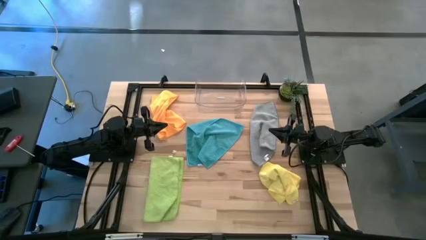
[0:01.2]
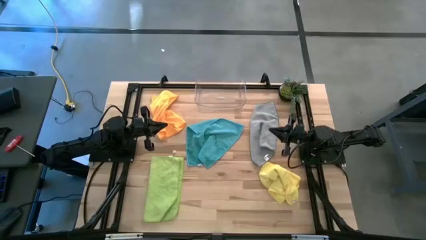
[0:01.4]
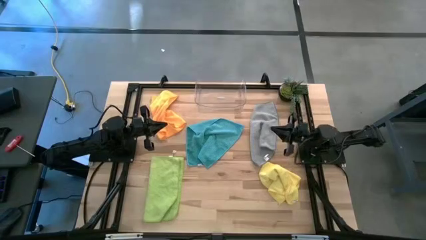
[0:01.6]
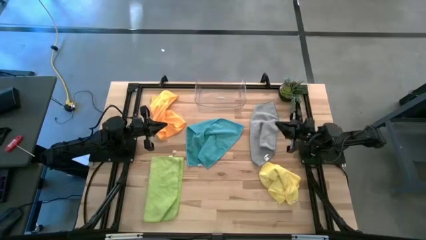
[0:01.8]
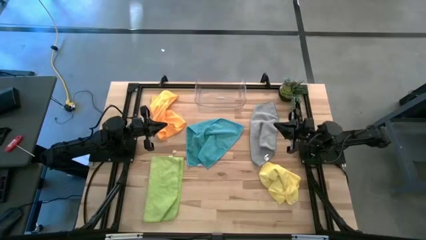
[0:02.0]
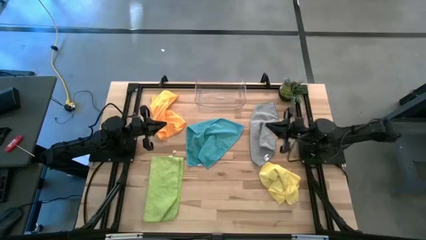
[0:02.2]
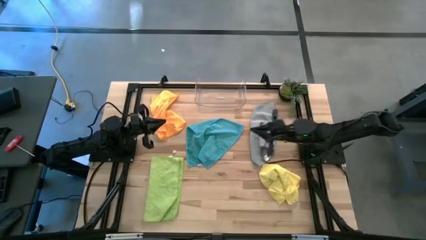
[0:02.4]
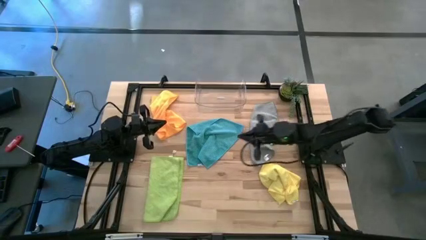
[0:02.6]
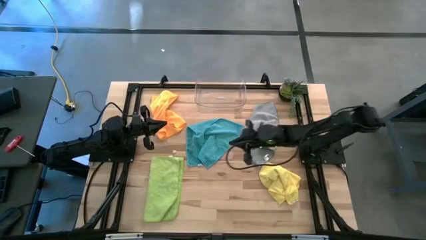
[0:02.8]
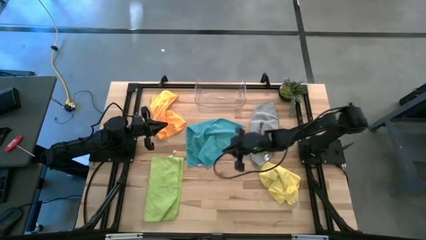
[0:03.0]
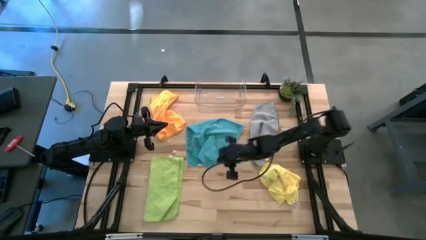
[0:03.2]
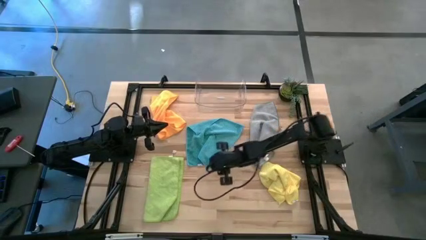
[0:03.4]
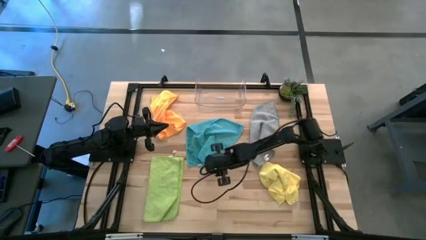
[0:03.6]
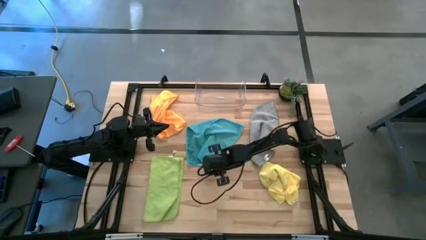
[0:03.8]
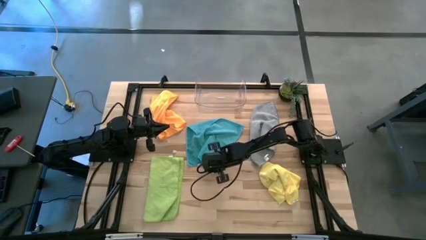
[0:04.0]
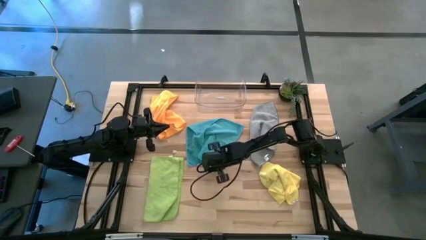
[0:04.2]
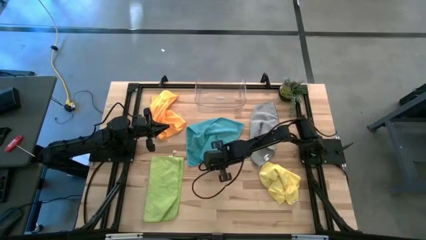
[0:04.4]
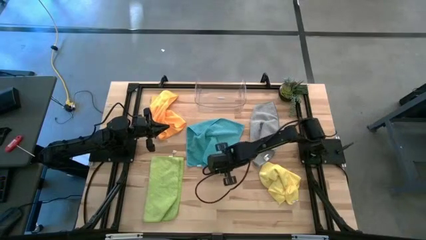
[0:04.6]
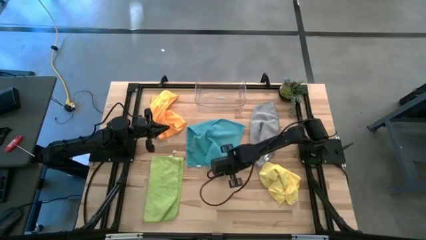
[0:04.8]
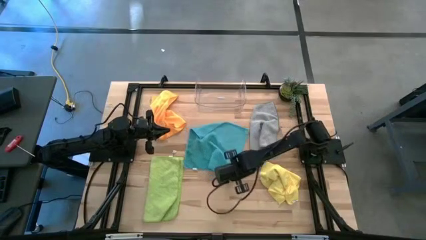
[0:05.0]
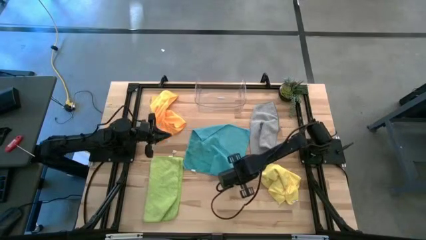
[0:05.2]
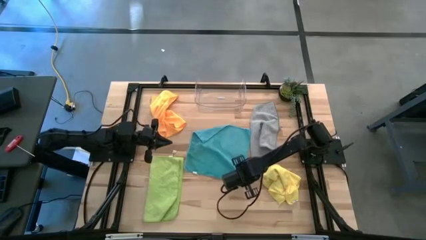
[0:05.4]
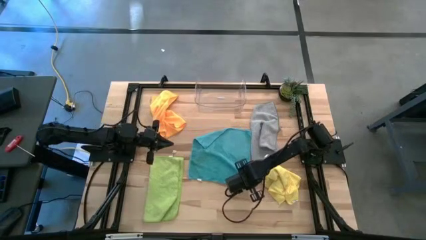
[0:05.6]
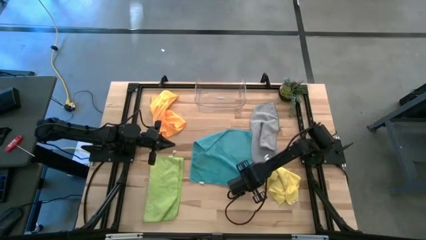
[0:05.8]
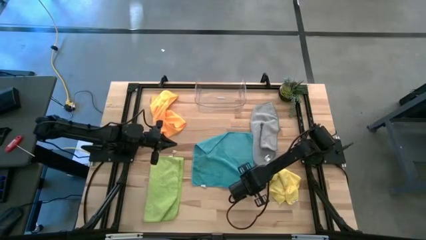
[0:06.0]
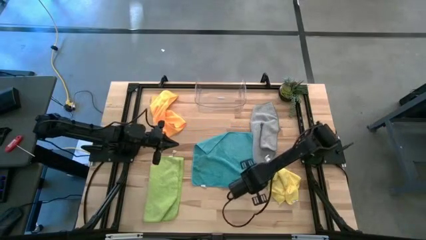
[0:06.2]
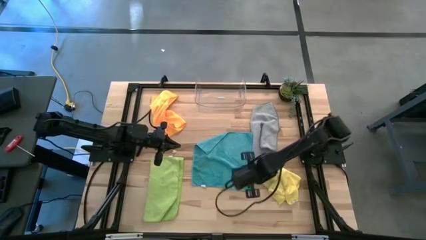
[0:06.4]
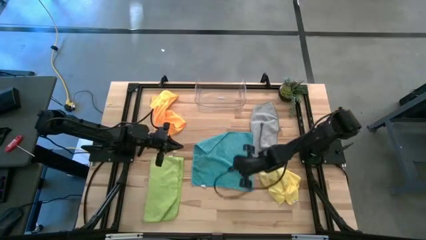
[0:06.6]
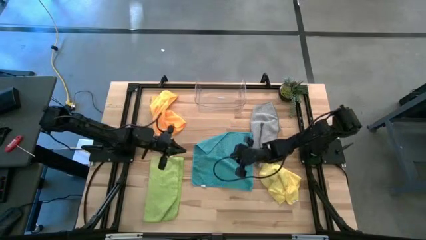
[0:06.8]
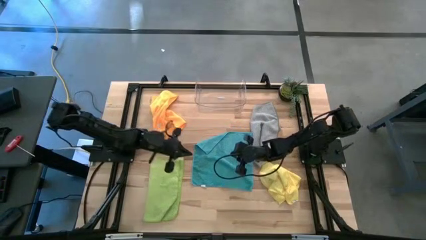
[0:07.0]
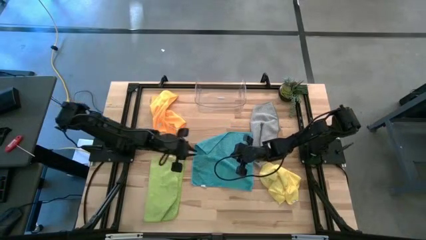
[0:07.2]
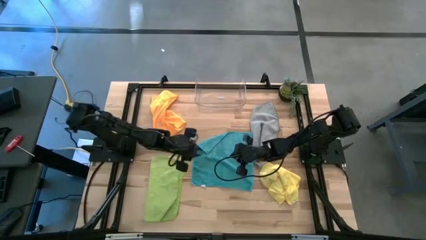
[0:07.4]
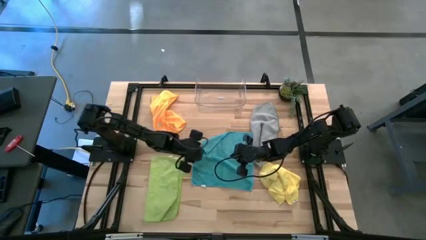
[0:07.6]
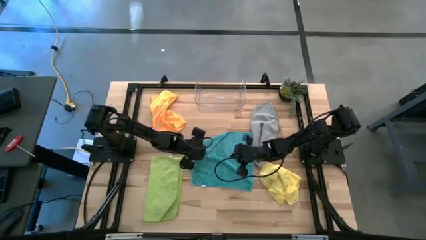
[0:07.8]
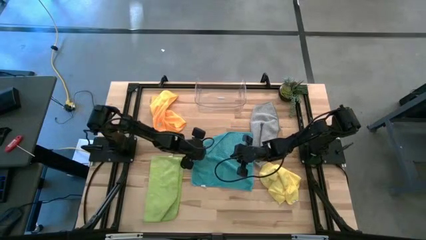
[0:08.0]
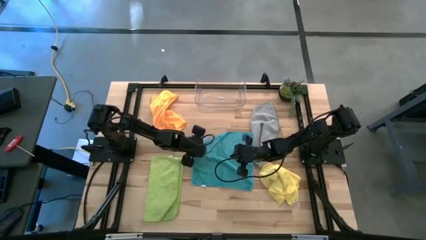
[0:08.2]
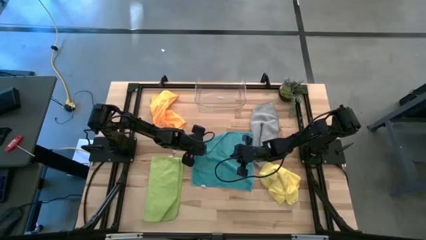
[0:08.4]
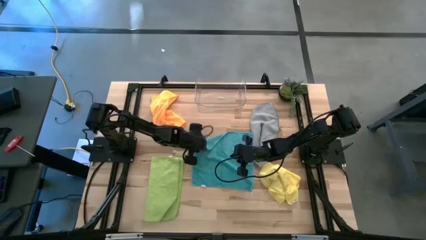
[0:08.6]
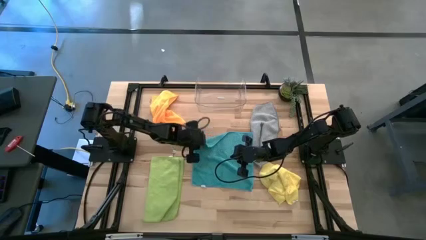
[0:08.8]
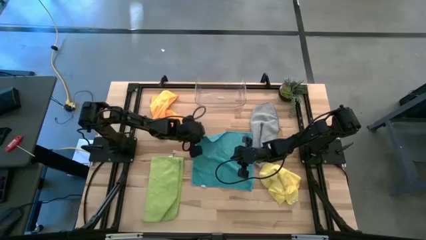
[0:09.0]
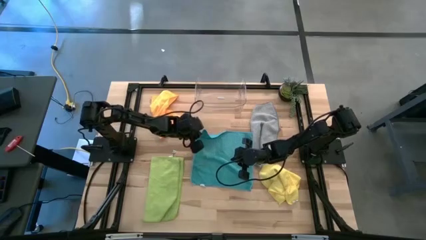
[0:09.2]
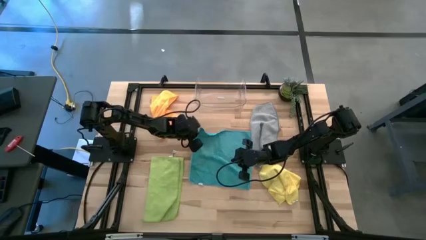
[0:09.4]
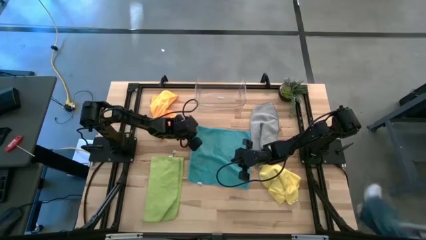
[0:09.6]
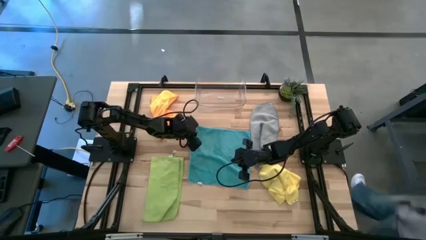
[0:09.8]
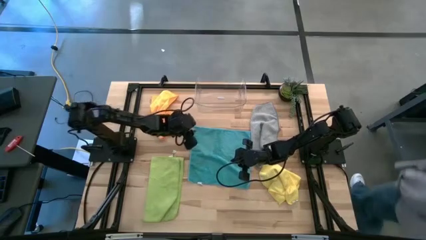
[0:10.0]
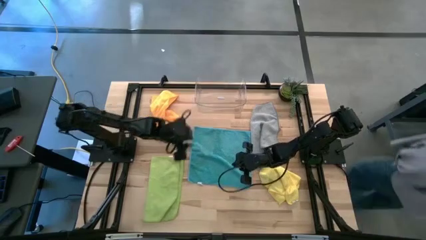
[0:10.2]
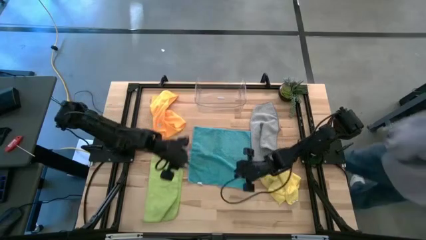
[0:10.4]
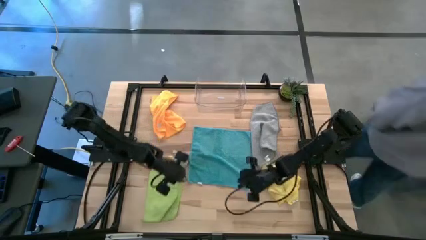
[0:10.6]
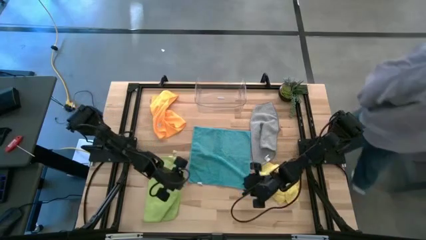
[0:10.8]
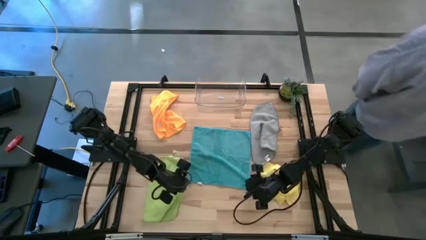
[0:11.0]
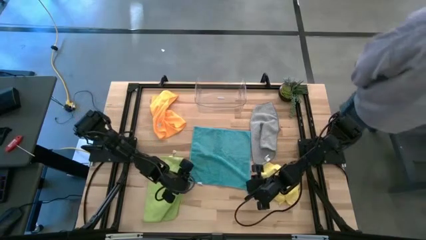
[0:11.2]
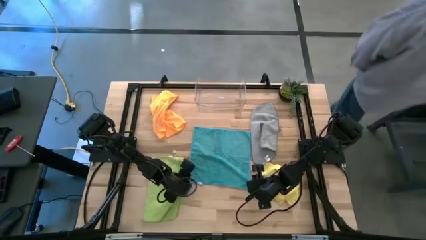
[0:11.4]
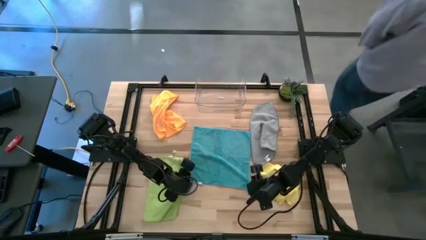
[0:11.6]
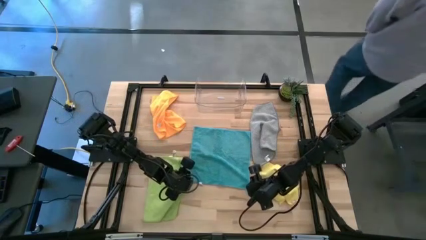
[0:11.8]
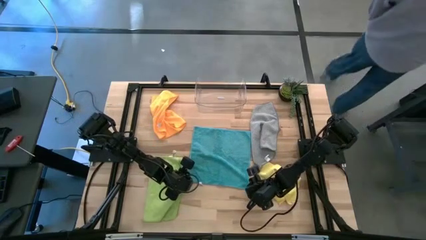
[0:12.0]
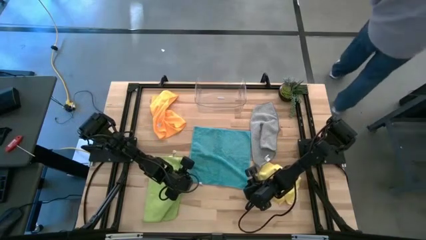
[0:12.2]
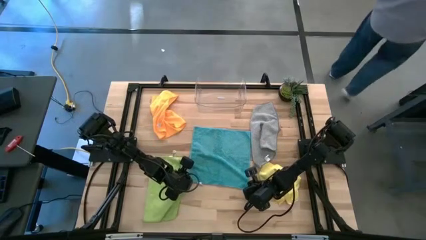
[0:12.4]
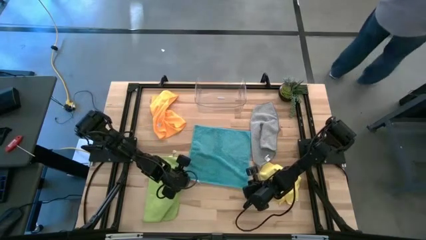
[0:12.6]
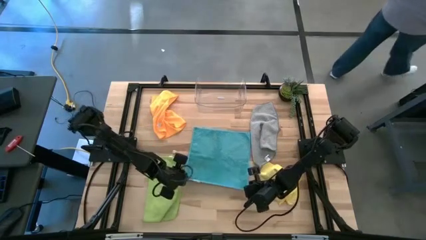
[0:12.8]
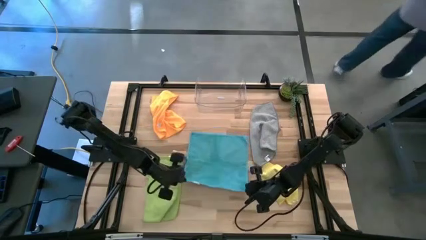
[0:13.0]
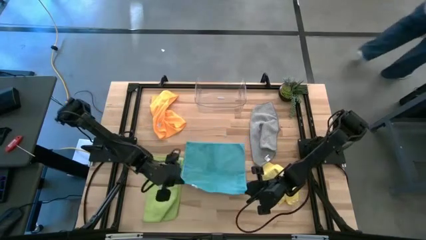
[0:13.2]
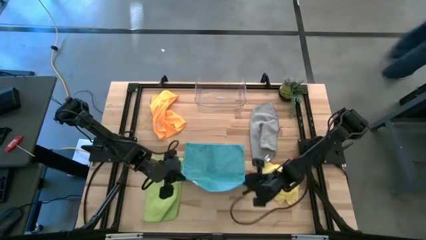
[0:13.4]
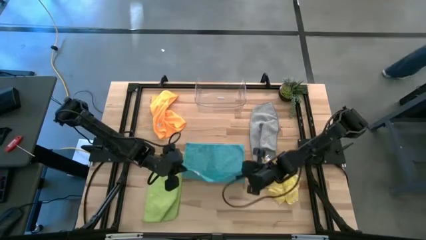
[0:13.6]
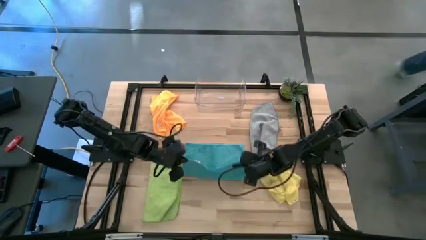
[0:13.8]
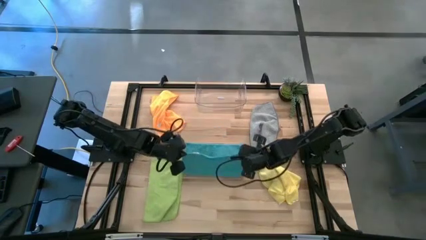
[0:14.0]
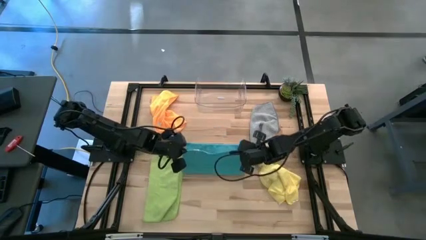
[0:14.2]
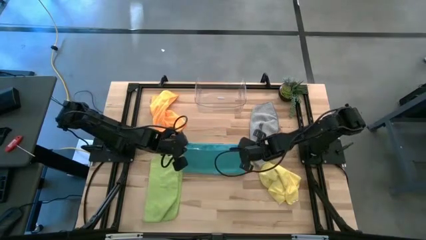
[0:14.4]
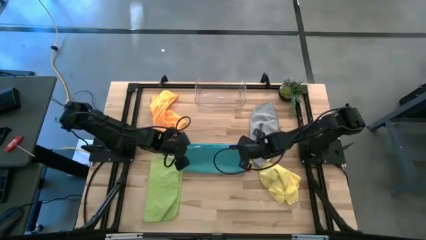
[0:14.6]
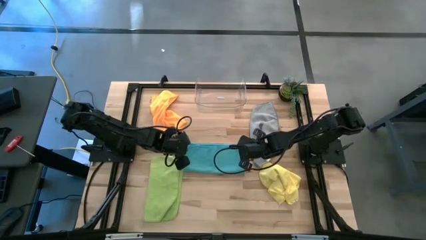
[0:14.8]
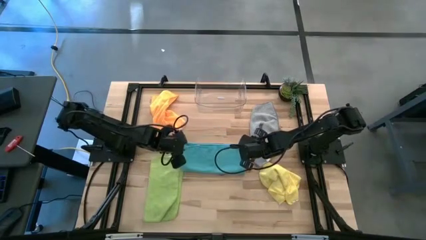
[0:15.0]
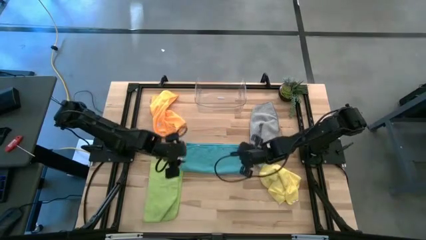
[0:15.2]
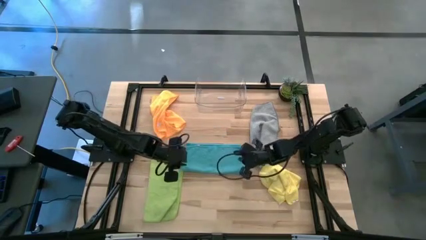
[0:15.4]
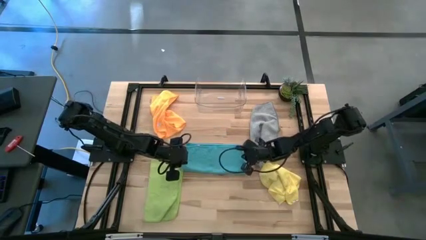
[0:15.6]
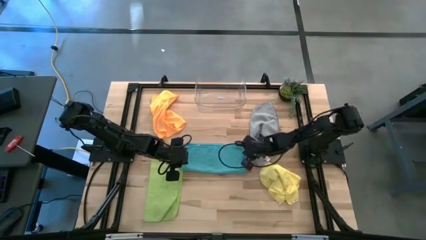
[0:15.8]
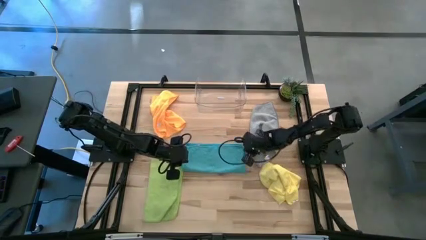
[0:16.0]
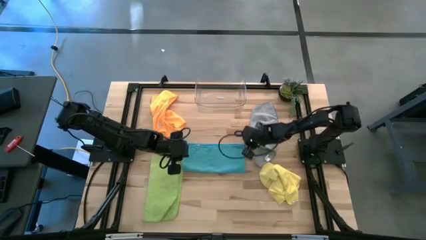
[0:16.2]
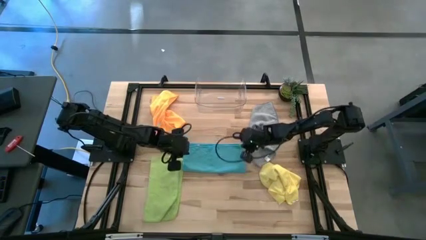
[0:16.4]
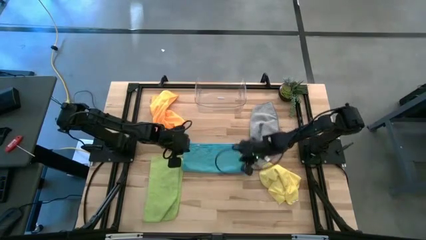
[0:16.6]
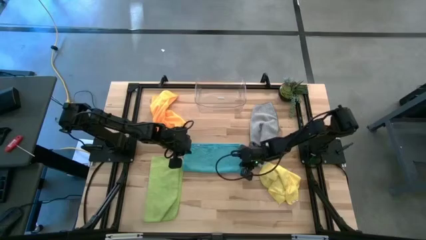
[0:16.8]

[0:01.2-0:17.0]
Task: Fold microfiber towels
Fold the blue towel on the table
